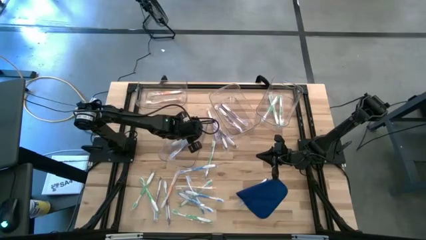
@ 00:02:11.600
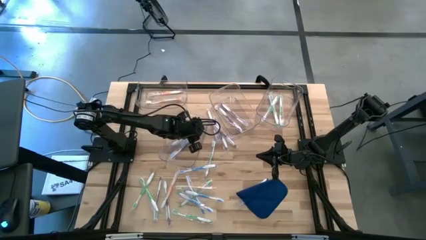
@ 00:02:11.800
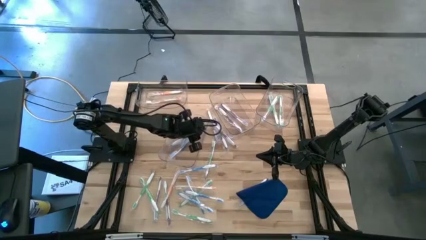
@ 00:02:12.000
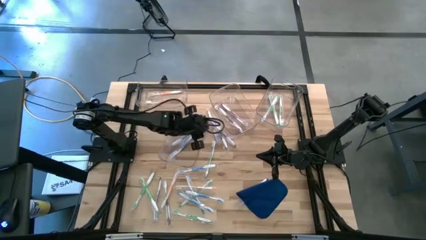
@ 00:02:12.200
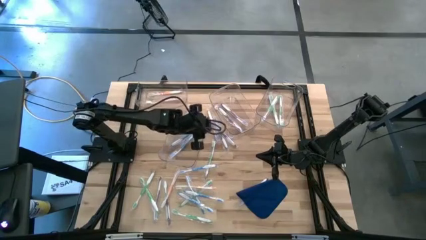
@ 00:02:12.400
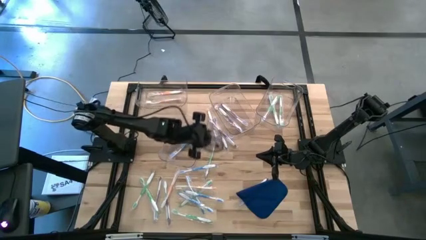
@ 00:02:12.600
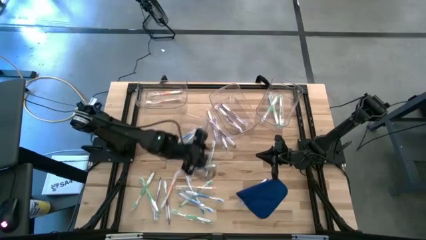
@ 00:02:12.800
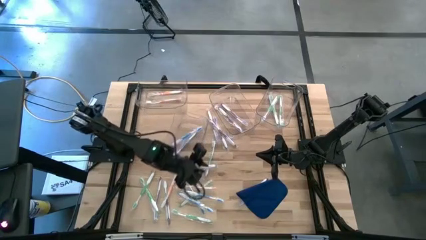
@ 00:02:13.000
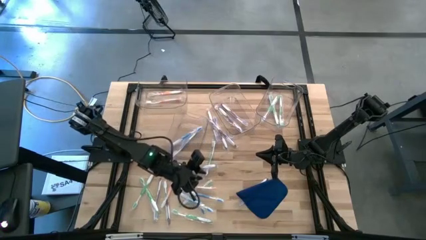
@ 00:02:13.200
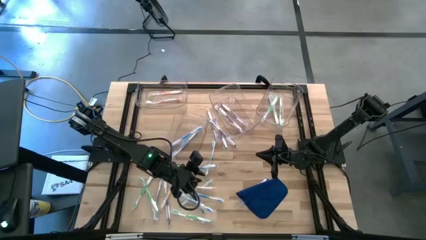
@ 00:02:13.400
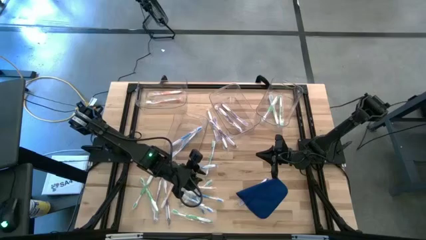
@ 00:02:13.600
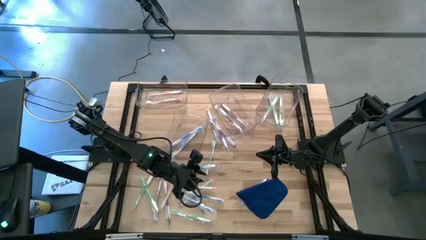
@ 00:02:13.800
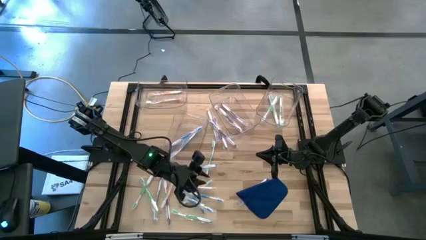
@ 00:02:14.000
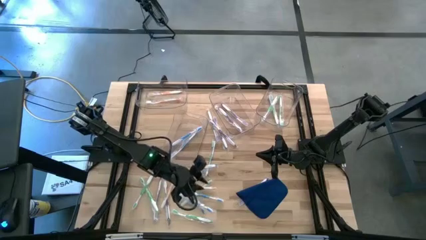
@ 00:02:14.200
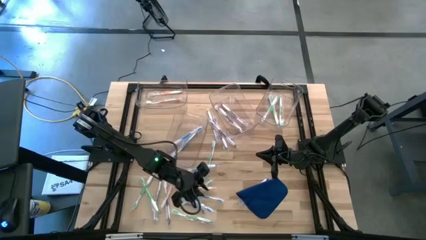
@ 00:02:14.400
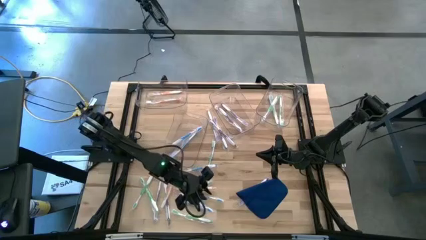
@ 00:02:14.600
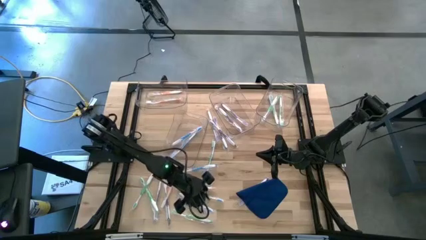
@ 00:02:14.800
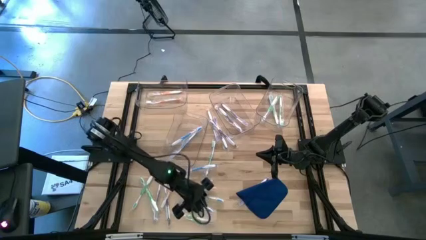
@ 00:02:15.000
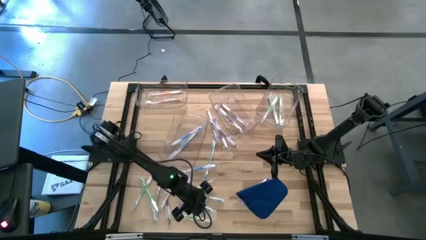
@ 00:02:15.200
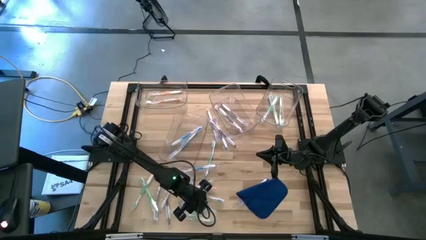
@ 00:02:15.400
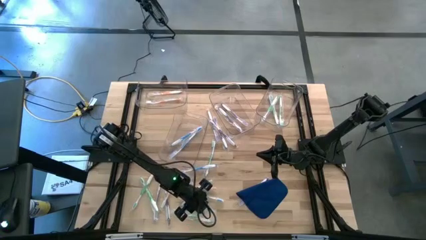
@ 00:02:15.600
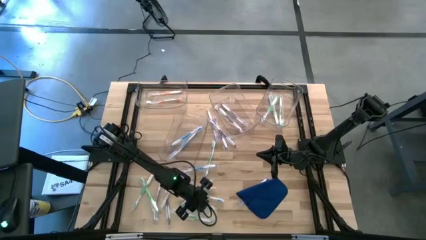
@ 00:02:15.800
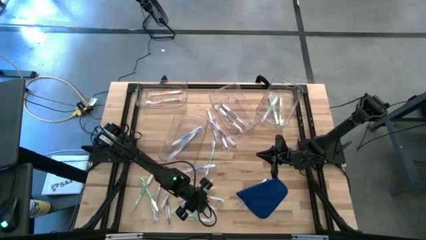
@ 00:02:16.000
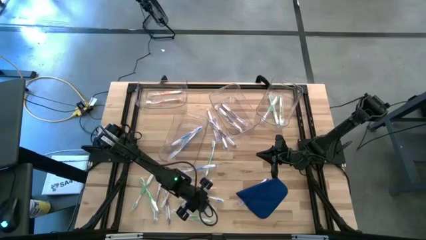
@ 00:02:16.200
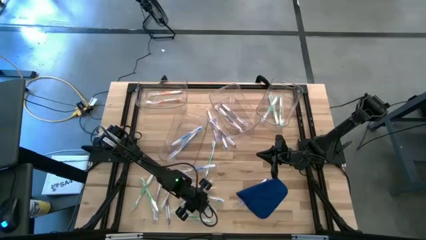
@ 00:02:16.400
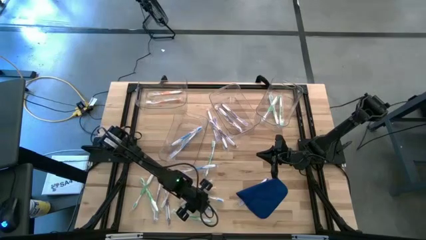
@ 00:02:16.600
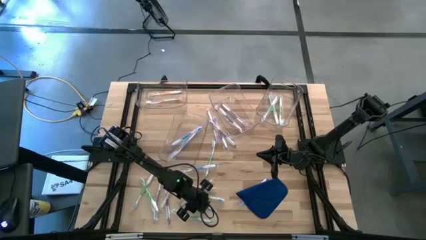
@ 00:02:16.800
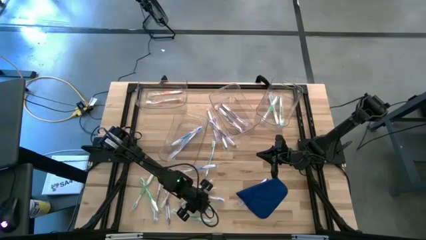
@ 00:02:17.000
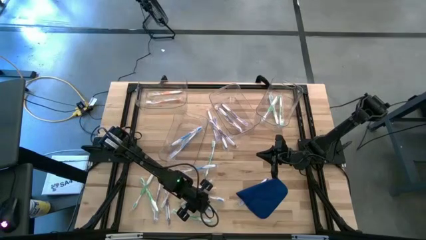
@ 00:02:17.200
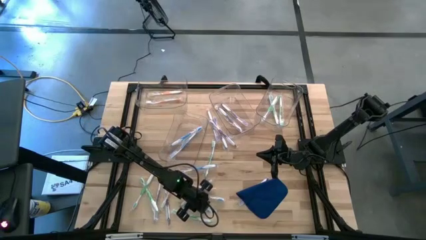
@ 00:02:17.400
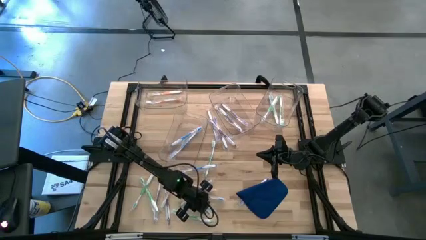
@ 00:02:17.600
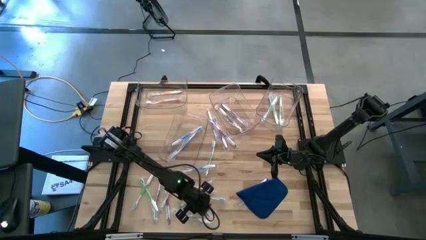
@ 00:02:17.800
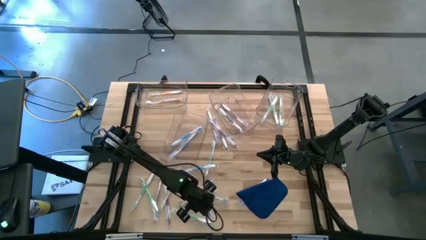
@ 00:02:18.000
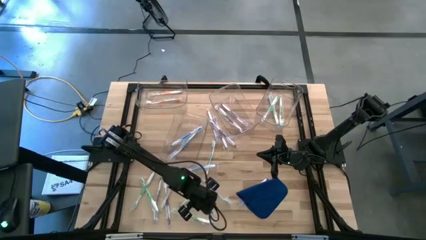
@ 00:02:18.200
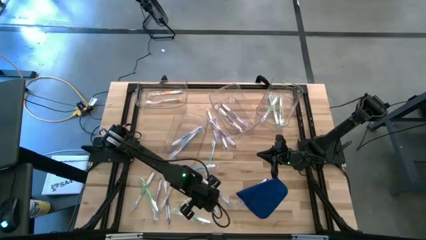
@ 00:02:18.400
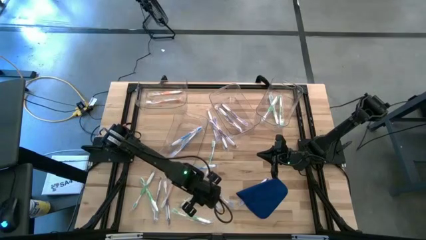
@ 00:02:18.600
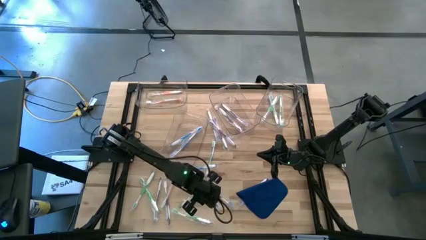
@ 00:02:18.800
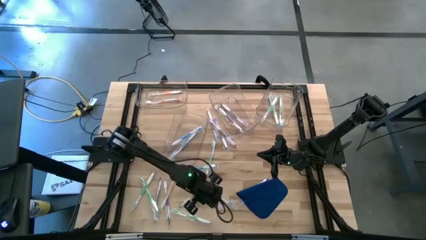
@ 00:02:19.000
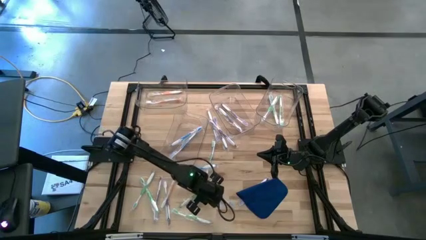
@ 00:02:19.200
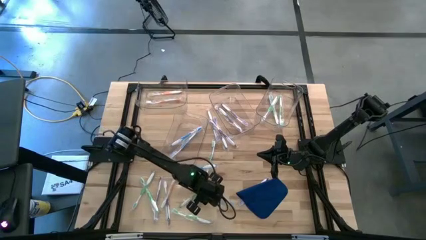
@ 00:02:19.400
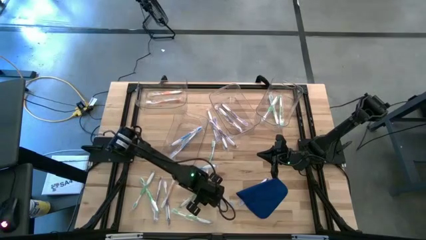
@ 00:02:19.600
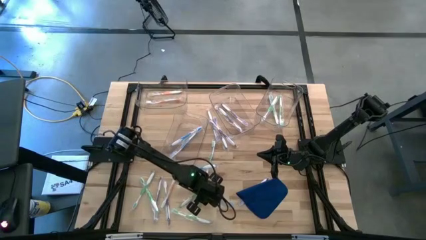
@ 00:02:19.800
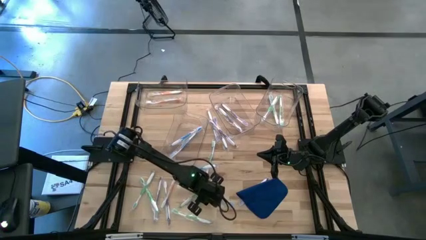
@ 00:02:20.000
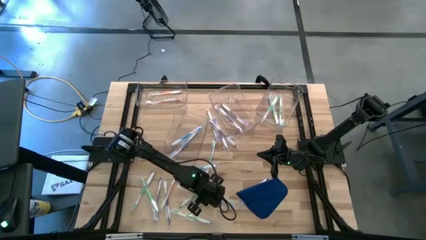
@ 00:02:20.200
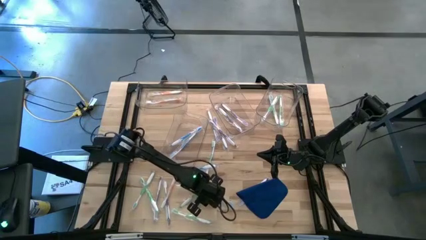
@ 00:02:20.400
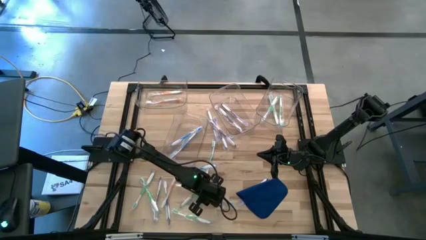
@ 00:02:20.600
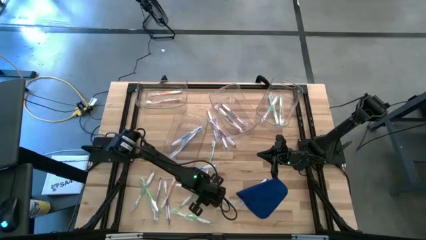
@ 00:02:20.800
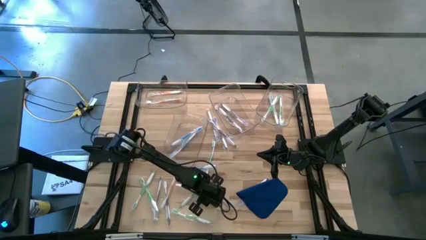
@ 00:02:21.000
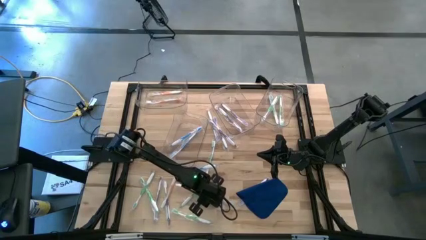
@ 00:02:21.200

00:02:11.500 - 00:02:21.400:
Task: Pick & Place Toothbrushes
Put the blue toothbrush into the bottom transparent bin

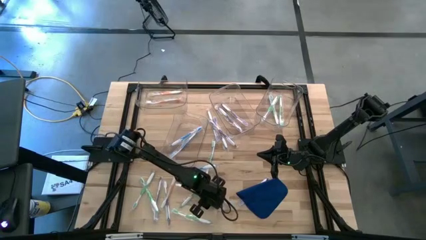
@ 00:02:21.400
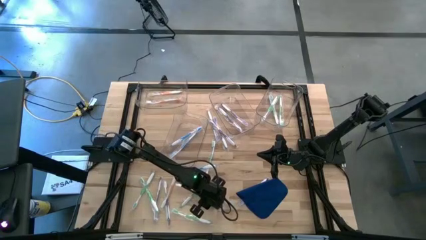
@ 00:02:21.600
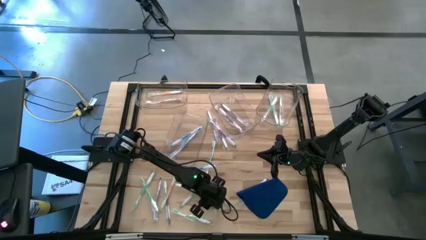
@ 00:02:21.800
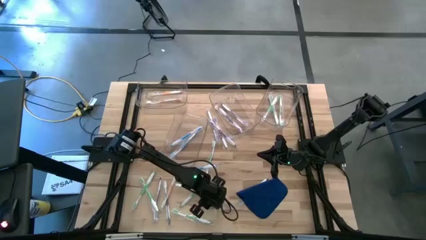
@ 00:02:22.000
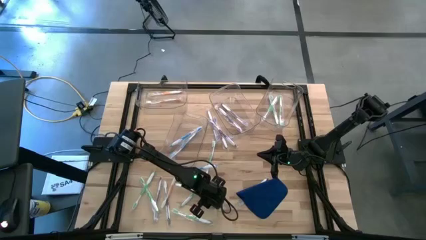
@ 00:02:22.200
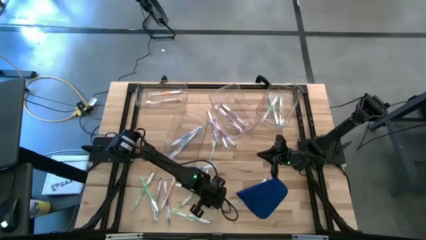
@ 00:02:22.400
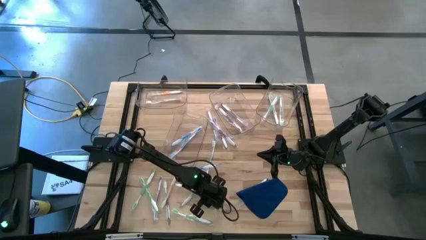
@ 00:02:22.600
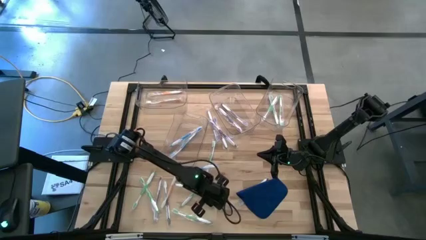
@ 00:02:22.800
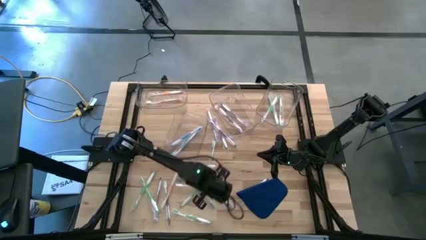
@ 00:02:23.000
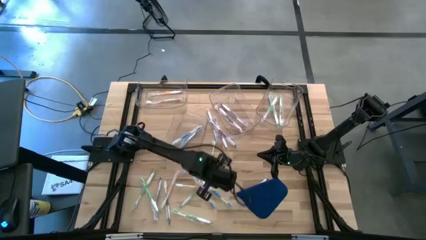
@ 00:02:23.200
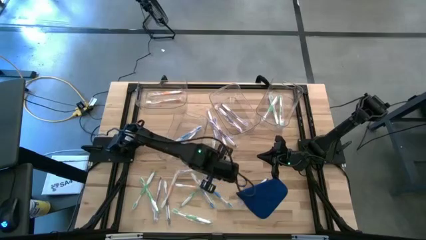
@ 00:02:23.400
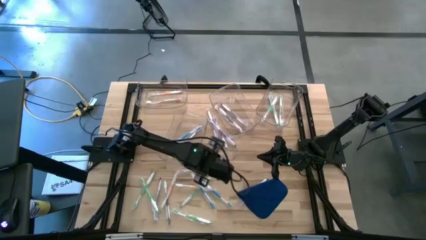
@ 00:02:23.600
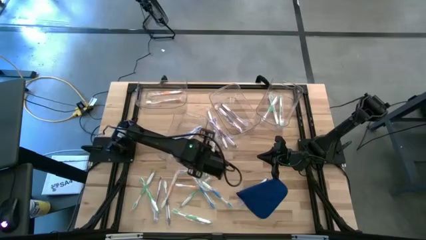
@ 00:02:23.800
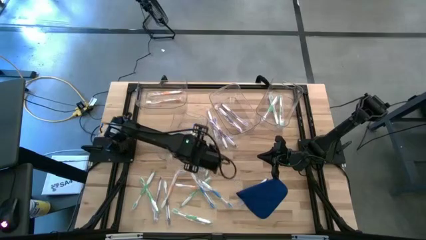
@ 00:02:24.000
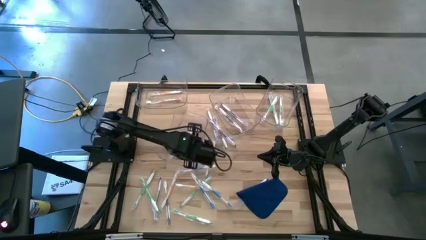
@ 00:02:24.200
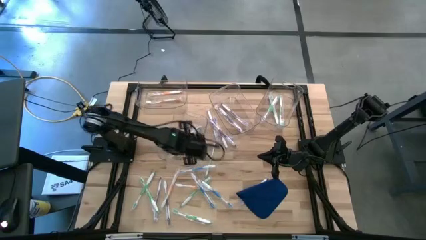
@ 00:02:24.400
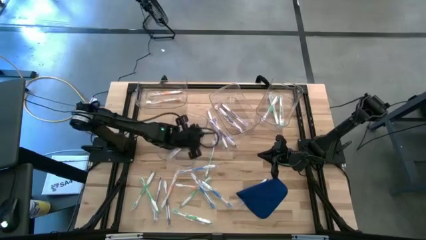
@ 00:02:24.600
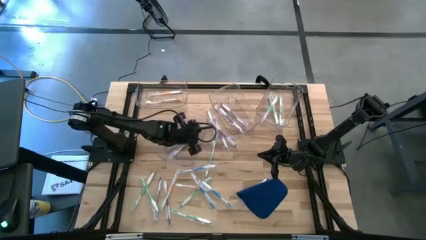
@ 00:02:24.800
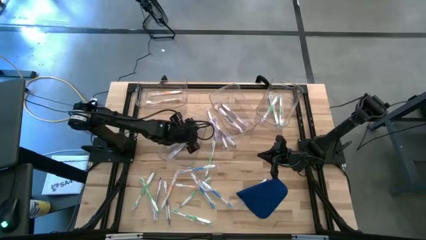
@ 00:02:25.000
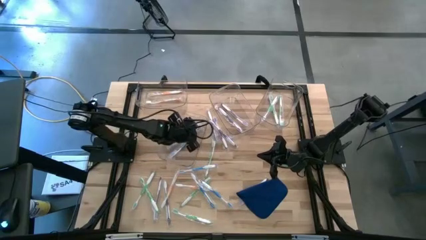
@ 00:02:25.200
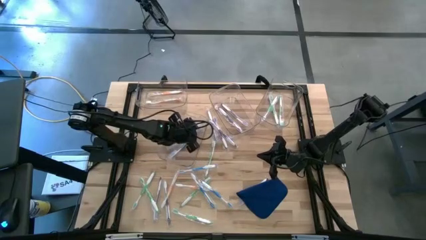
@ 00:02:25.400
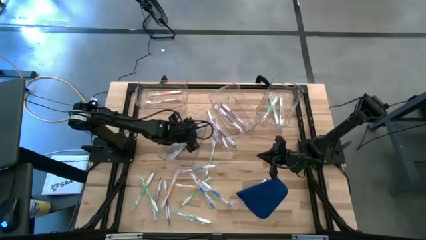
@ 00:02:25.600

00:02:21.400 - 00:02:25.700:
Put the blue toothbrush into the bottom transparent bin
